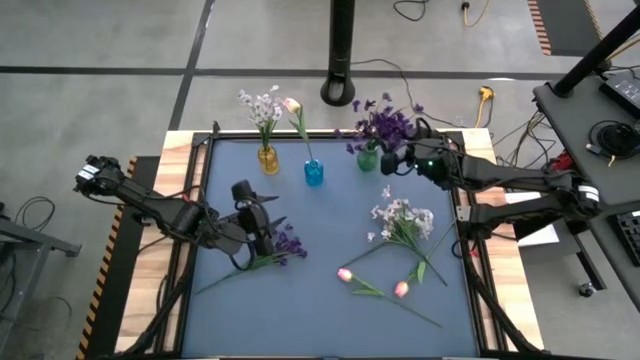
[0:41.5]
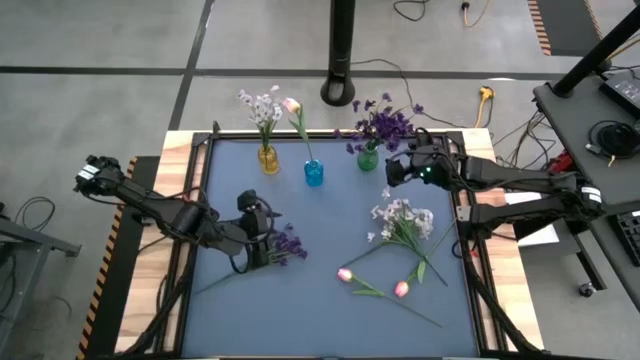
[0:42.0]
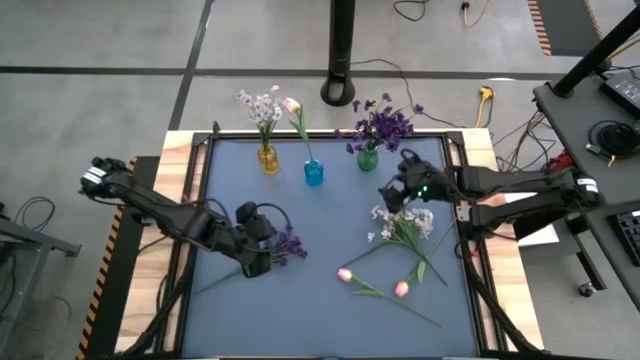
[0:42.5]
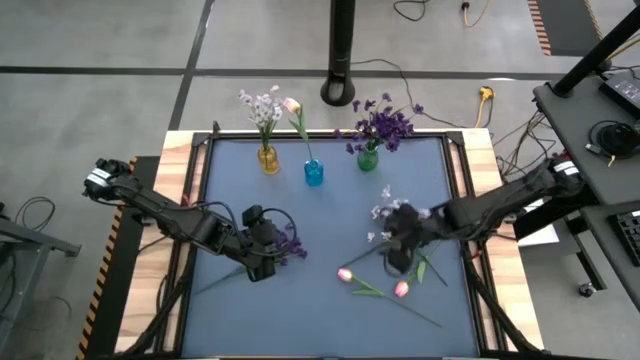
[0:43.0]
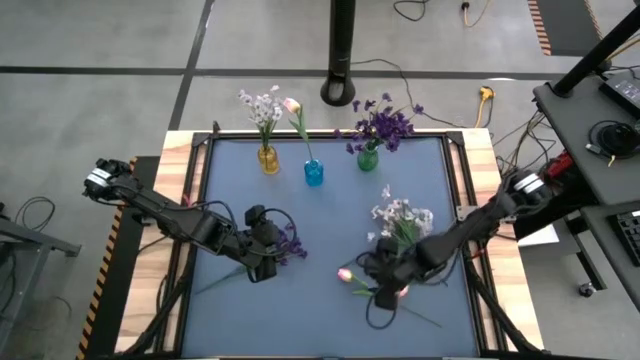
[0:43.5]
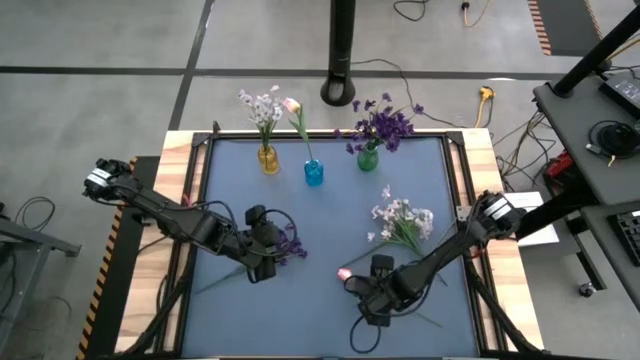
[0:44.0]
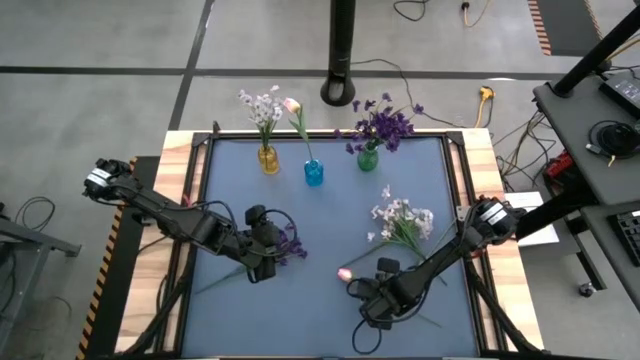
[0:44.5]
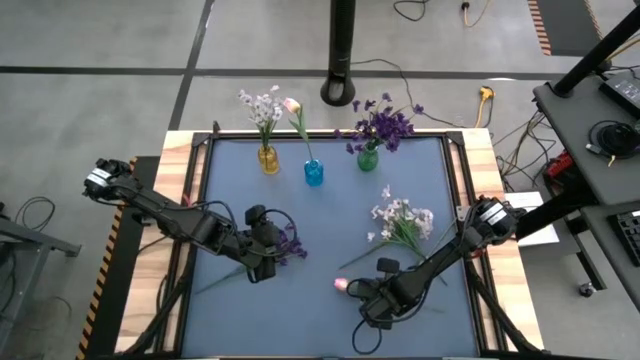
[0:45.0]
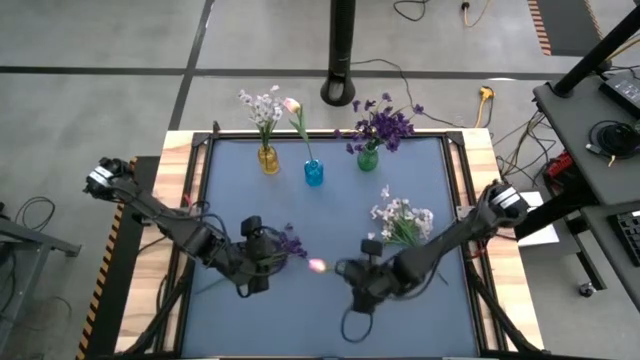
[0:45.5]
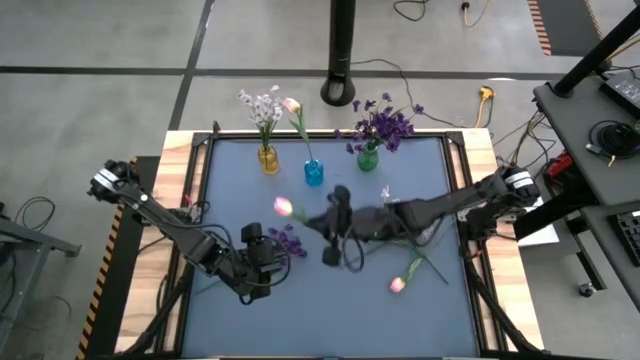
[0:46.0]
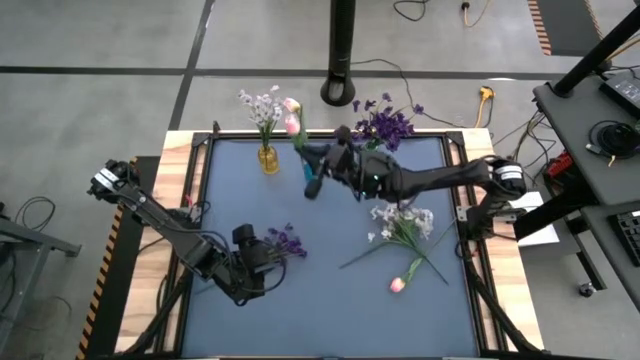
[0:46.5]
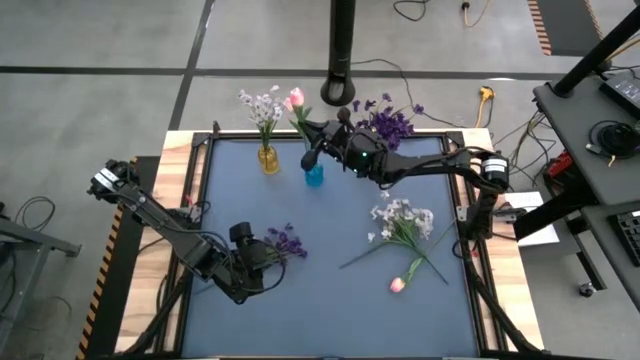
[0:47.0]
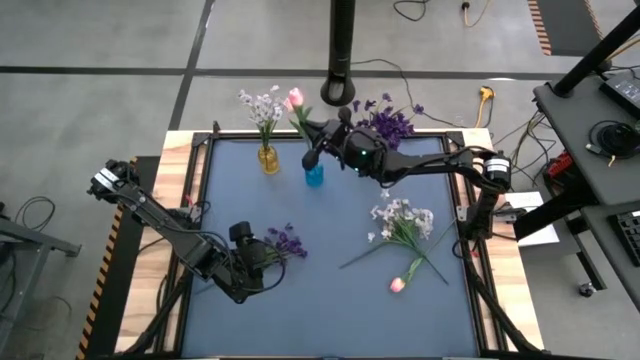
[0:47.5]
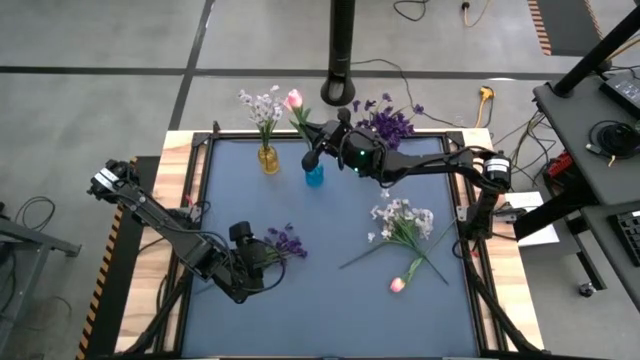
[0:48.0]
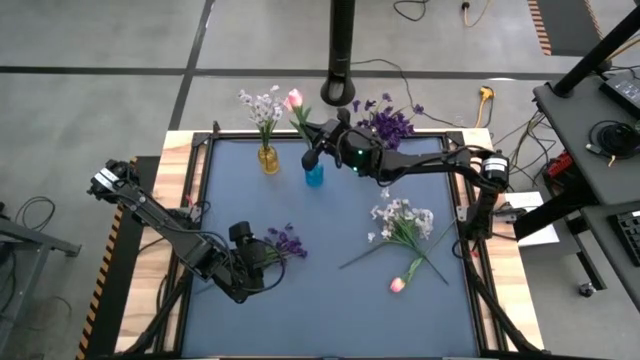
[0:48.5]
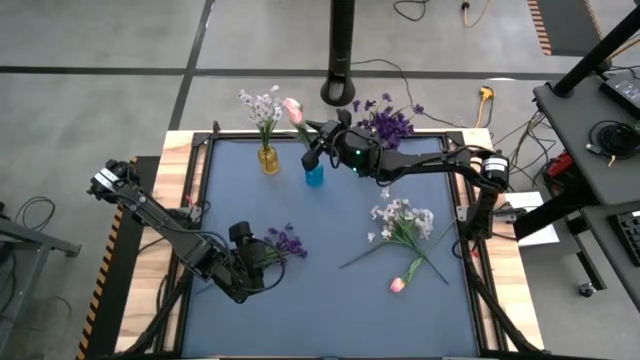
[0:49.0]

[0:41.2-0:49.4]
Task: Sort flowers into vase by color
Put the left pink flower into the blue vase

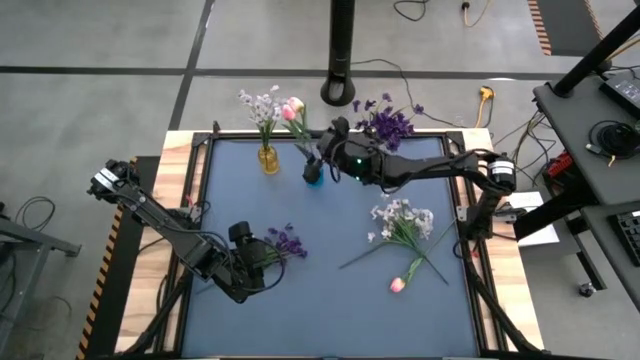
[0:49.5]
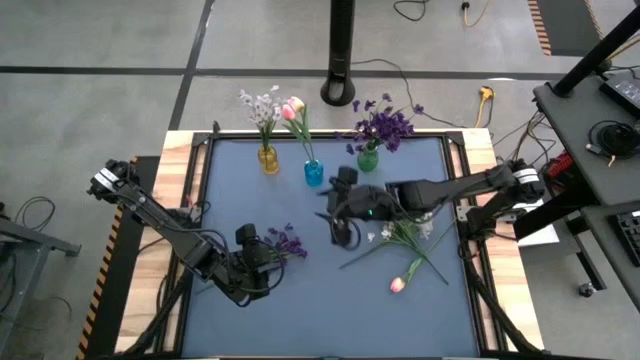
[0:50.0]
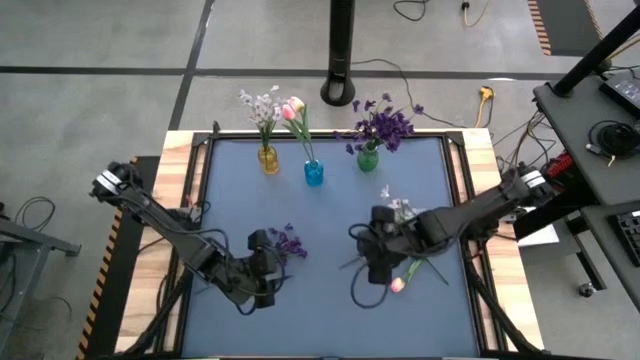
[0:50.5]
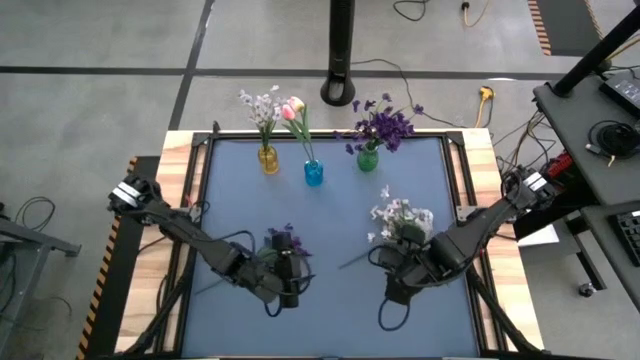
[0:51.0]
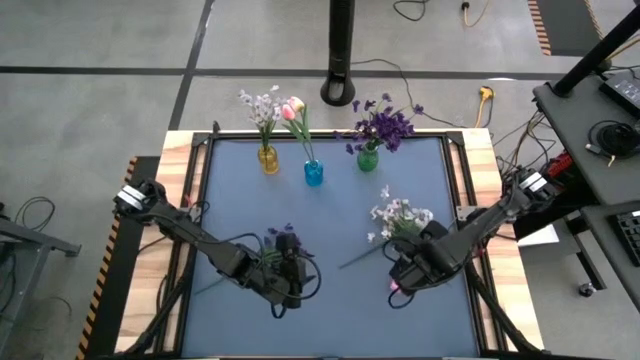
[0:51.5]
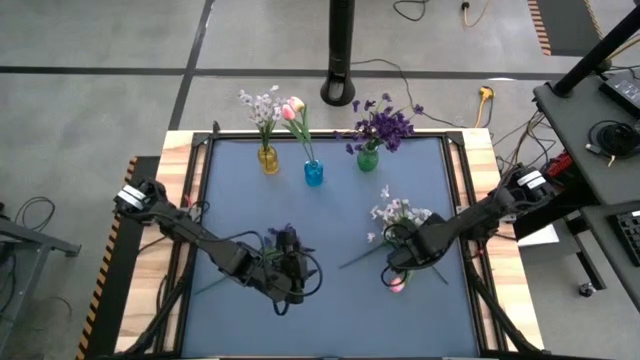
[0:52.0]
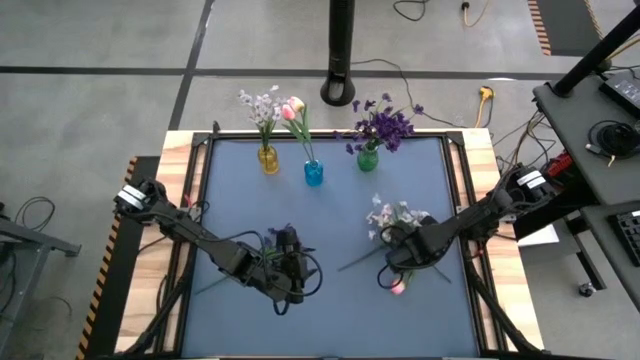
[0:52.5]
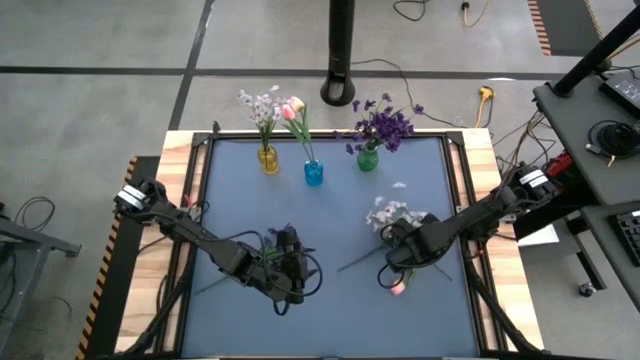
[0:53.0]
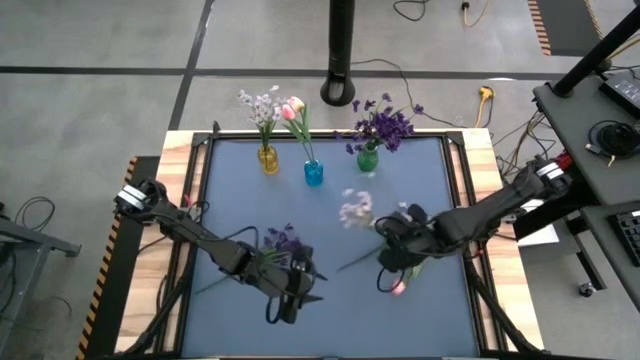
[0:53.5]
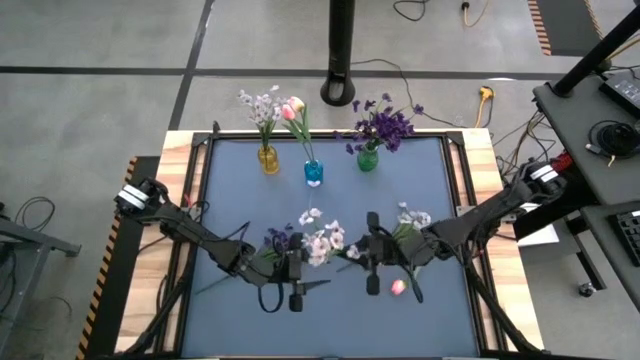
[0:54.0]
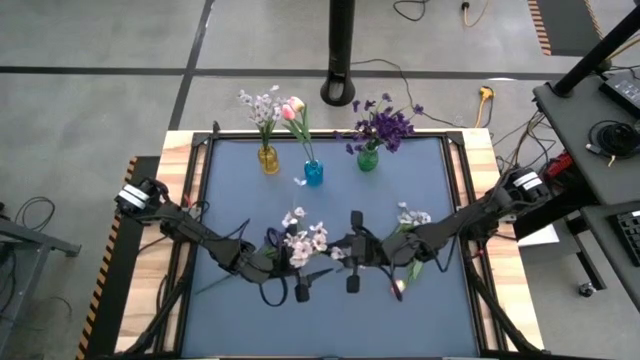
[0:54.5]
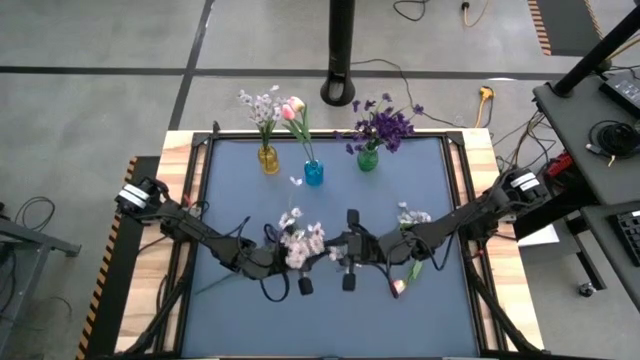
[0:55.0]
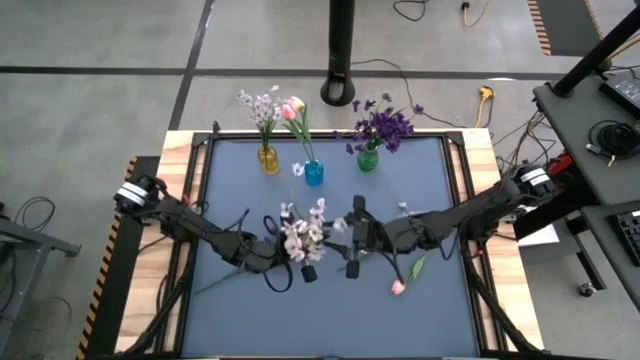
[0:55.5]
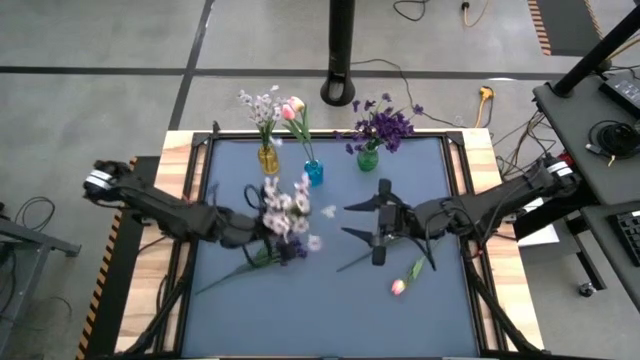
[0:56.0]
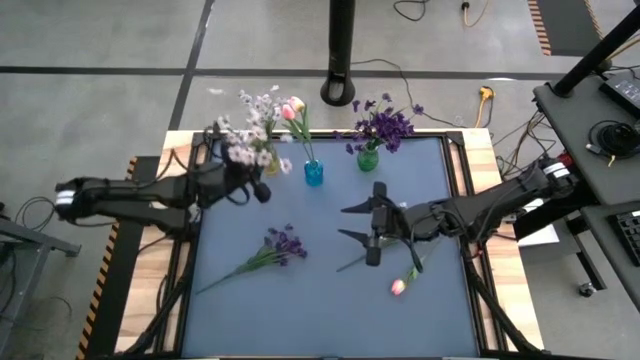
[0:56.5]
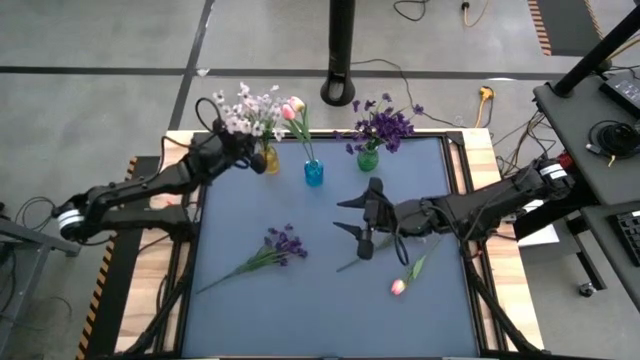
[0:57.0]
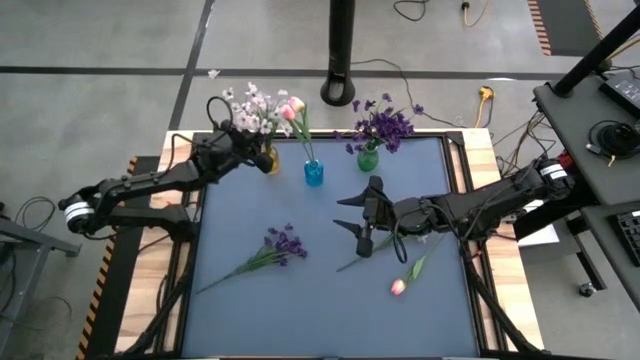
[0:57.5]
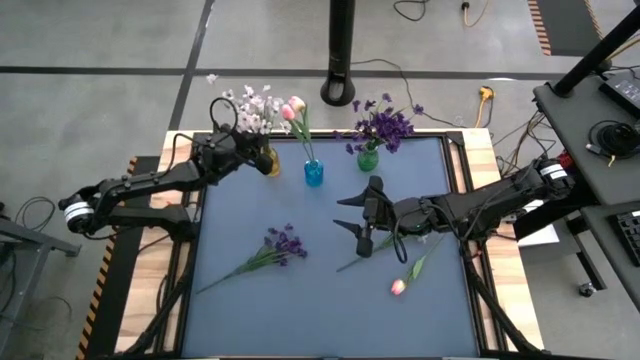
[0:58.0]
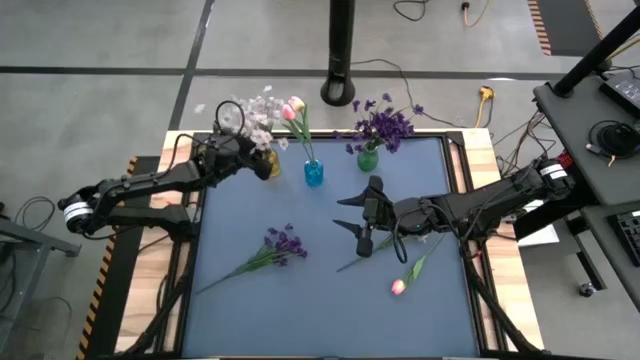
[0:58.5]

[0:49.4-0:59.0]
Put the top white flower into the yellow vase

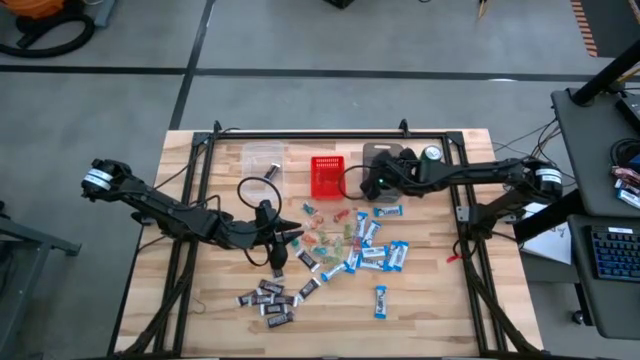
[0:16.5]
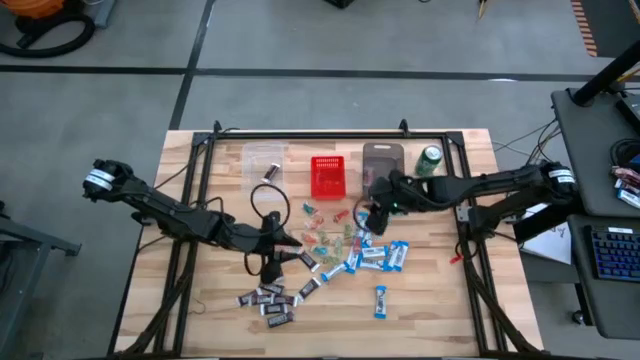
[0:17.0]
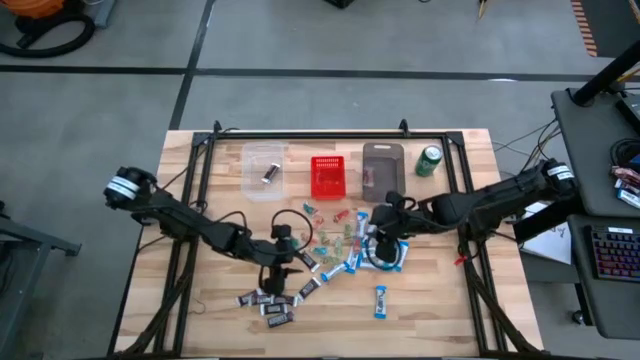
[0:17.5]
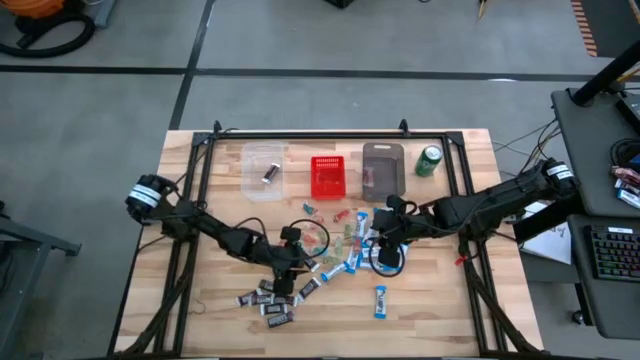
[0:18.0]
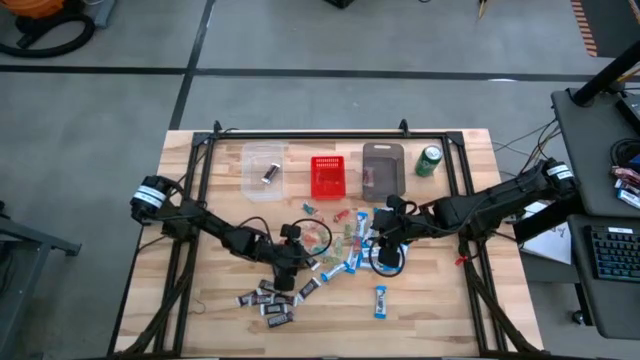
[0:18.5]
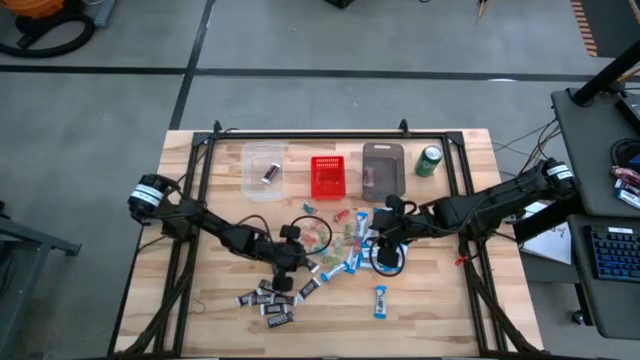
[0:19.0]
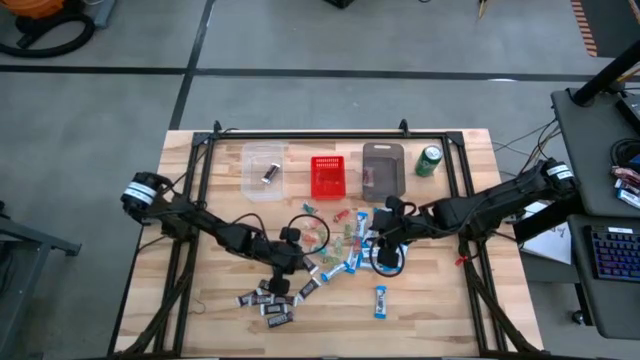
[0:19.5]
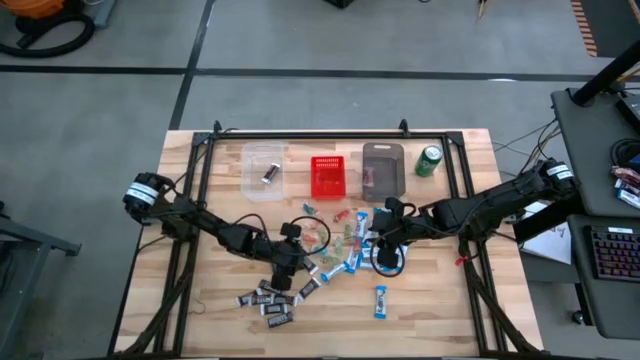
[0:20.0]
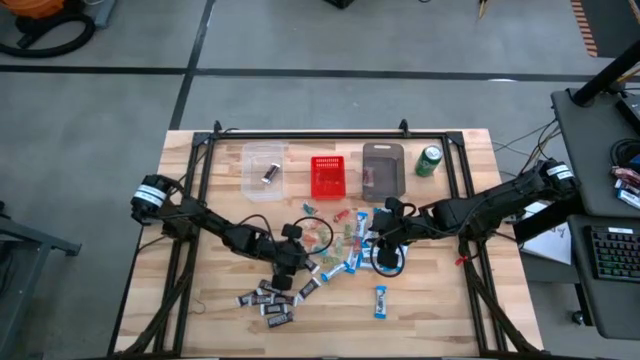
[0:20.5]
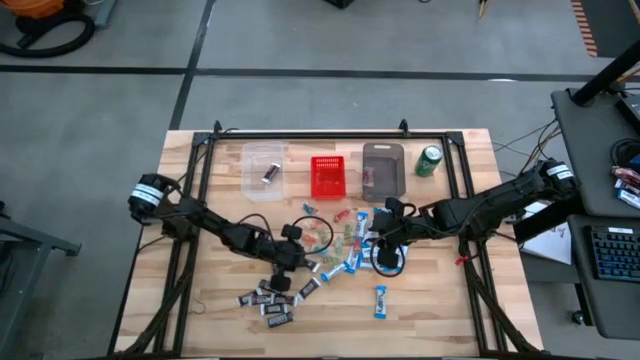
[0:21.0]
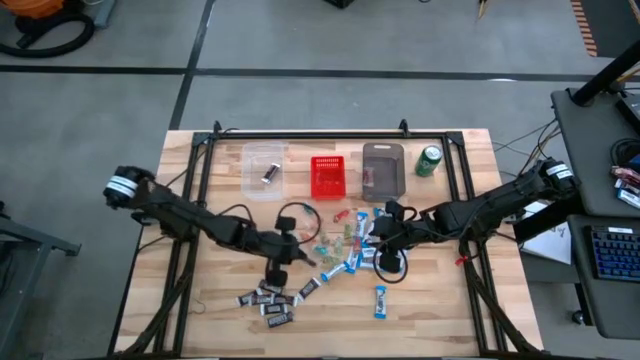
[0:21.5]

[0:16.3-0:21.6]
Task: Sort candy
Put the brown chocolate bar into the transparent bin
